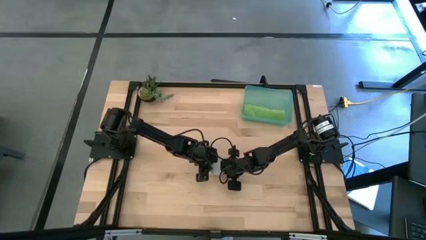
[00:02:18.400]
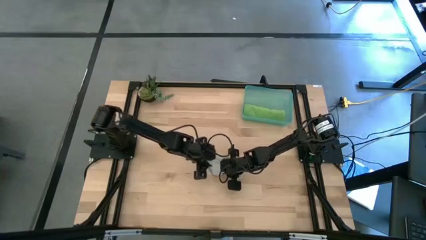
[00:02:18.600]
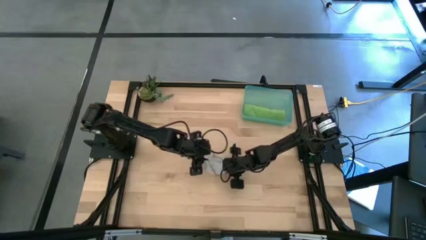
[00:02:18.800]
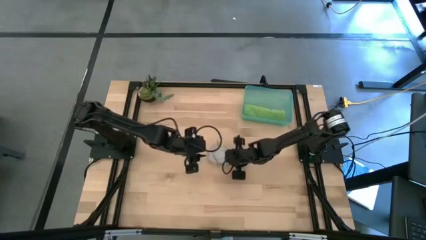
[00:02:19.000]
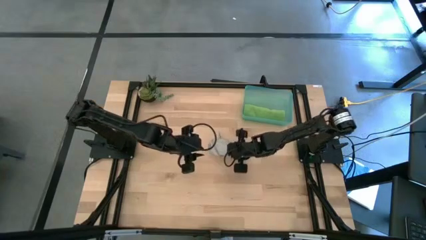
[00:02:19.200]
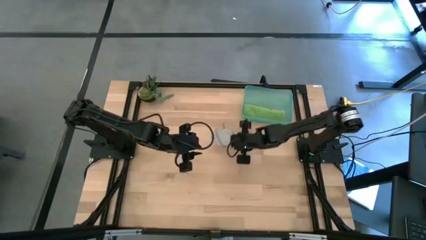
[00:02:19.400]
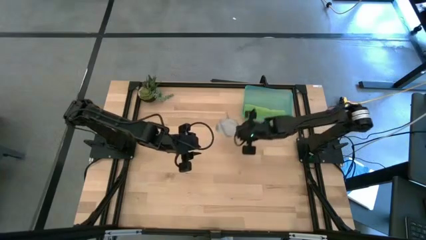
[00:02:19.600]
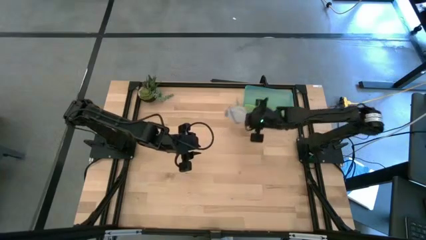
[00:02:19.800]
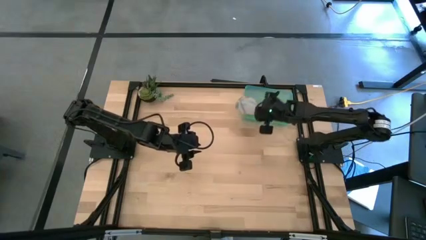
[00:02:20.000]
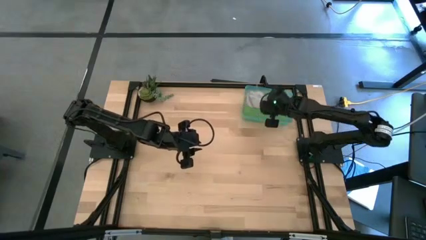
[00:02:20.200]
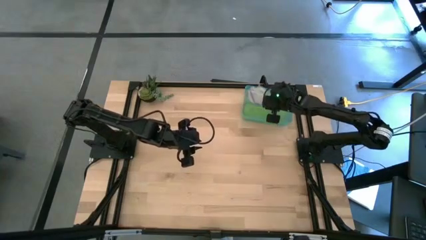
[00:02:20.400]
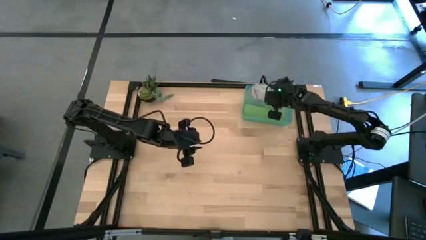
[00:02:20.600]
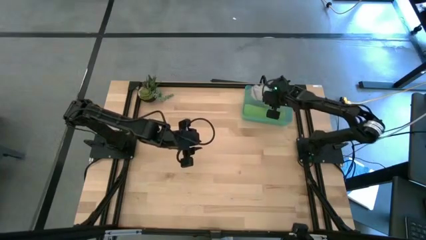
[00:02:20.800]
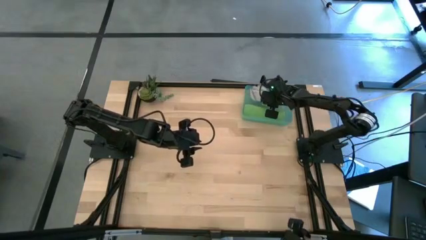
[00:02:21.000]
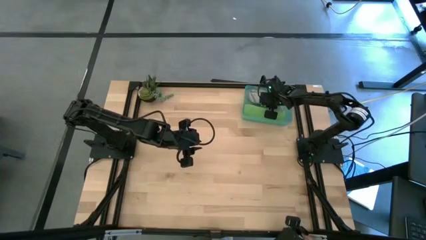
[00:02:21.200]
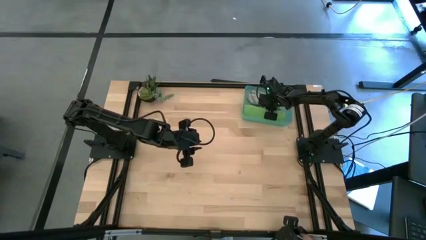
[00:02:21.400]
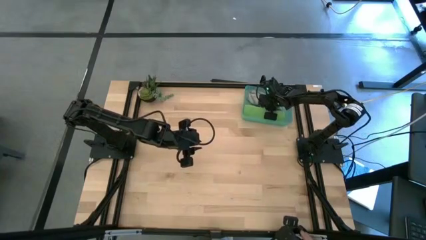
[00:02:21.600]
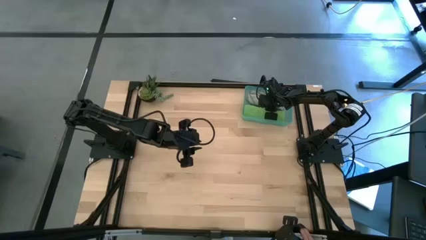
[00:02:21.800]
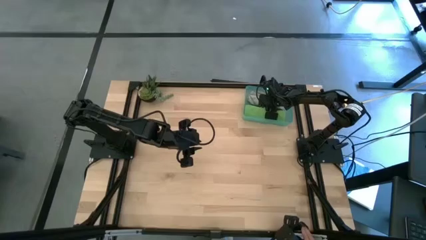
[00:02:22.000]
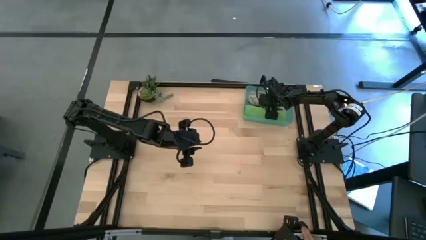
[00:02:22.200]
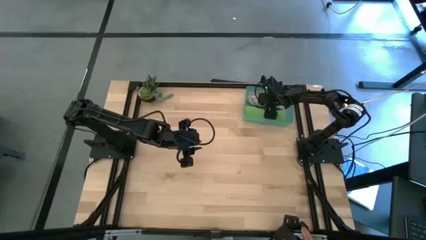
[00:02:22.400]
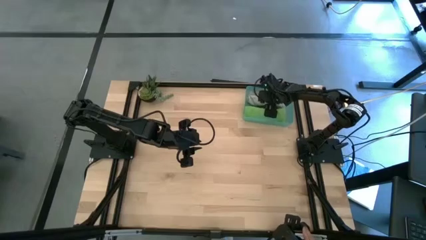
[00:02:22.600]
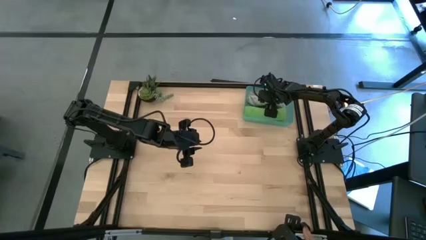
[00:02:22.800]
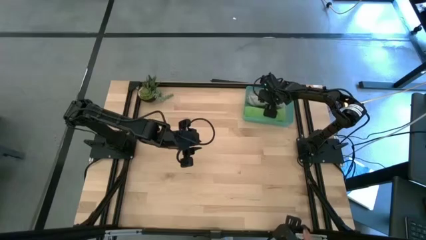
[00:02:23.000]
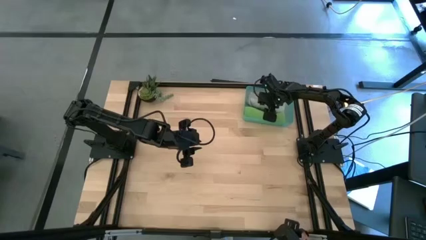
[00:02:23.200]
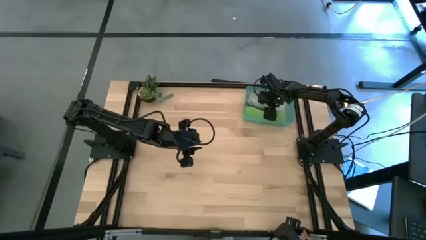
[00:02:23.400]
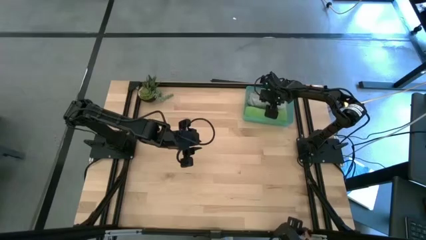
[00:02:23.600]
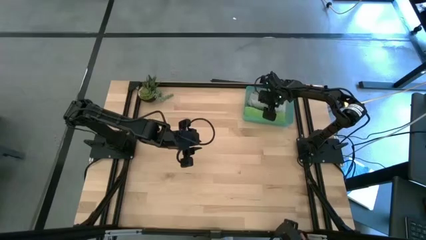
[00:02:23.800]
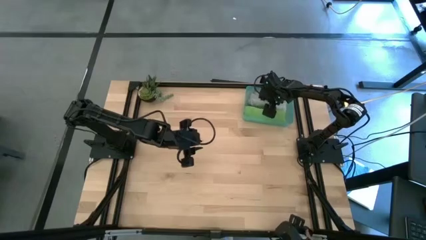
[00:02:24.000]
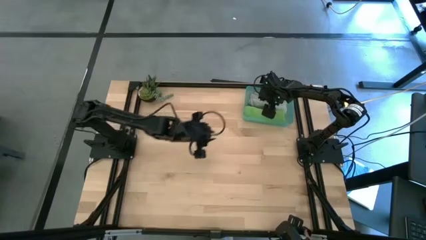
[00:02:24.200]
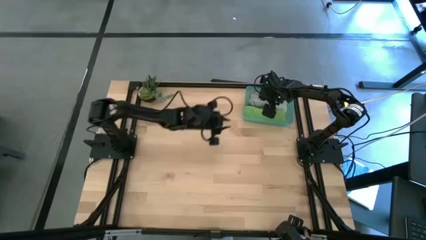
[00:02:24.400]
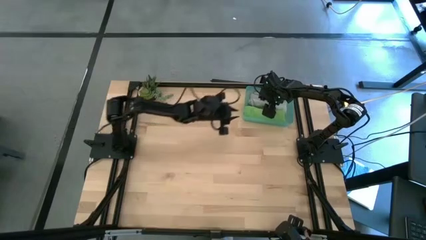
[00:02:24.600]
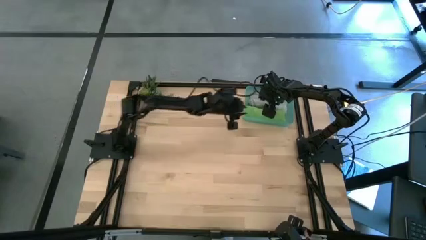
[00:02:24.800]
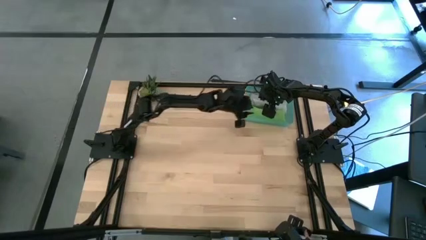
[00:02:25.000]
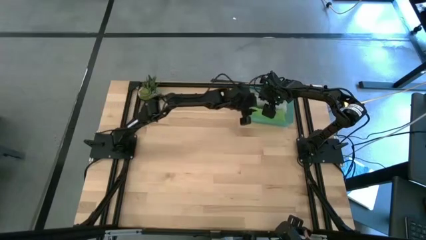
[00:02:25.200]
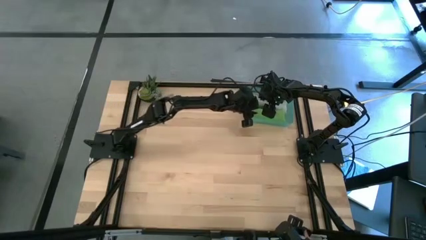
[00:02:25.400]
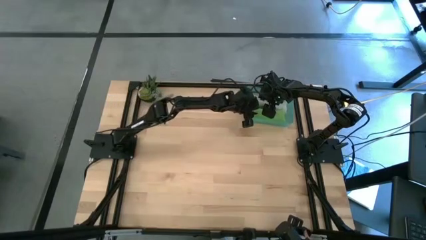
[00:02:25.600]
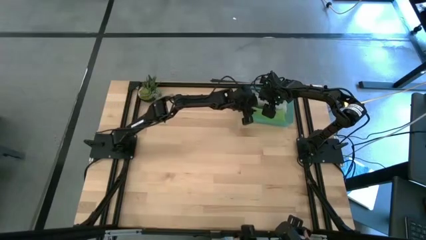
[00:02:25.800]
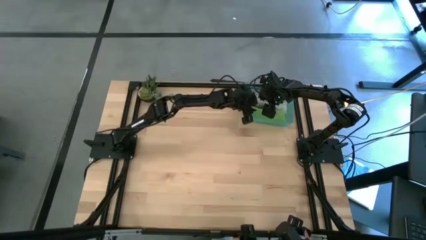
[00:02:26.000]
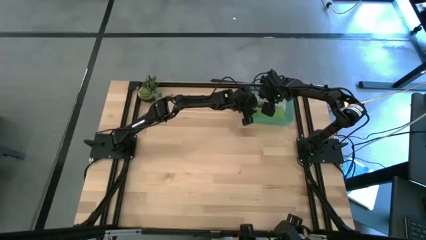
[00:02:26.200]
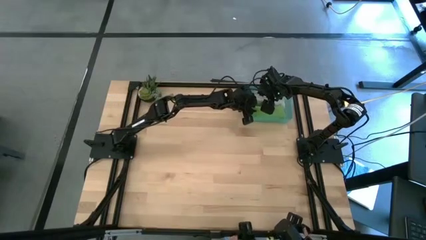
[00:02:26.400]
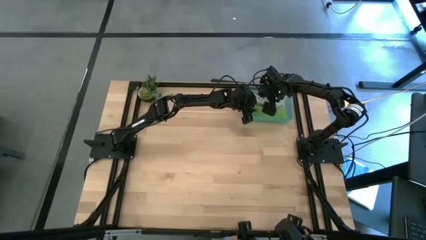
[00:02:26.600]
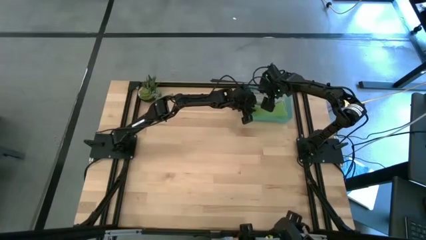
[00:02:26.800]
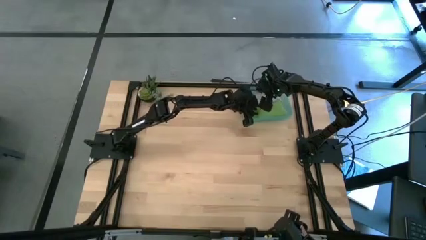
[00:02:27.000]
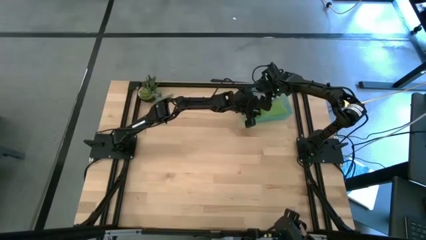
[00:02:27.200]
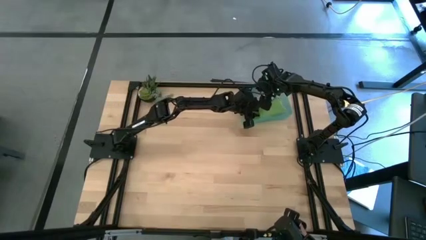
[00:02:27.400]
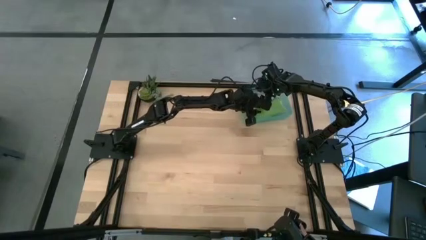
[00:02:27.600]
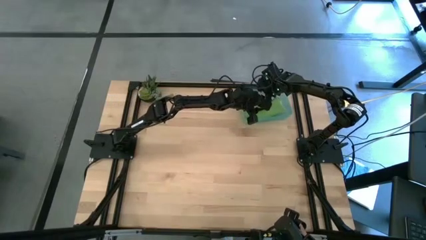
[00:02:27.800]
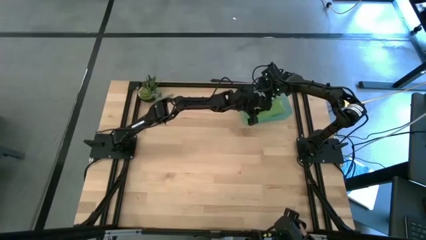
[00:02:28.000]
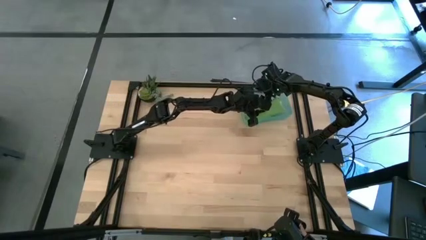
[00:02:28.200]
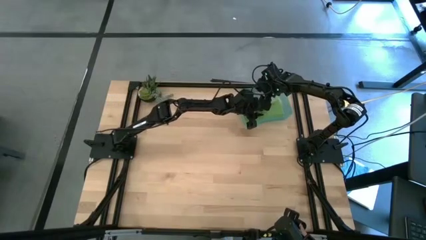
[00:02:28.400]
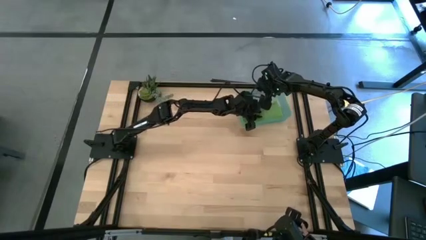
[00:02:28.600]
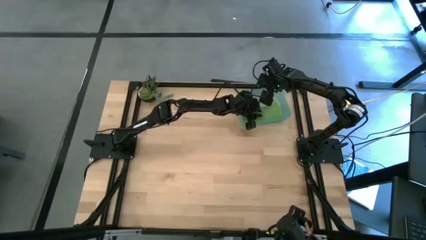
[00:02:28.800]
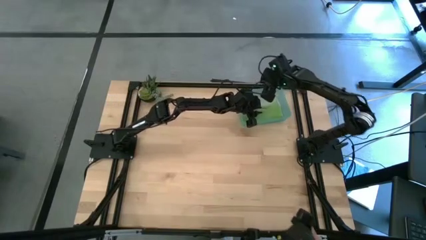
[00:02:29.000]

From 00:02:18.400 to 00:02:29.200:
Task: Roll microfiber towels into tight, uniform cylinder then place into a basket
Put the gray kitchen towel into the green bin

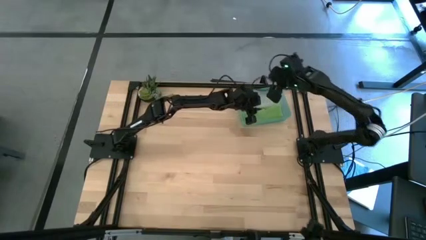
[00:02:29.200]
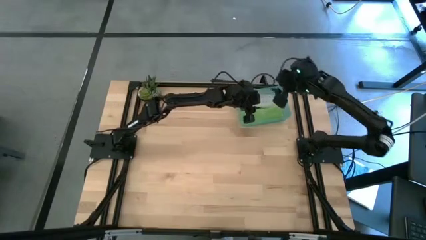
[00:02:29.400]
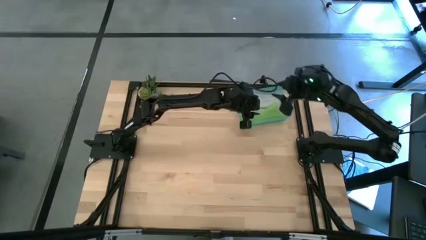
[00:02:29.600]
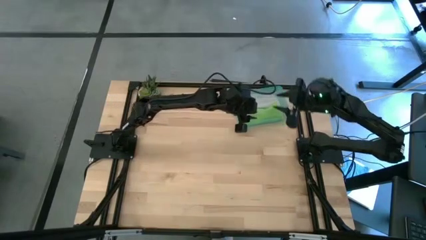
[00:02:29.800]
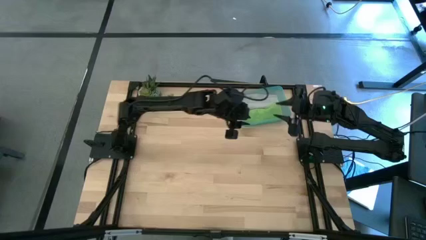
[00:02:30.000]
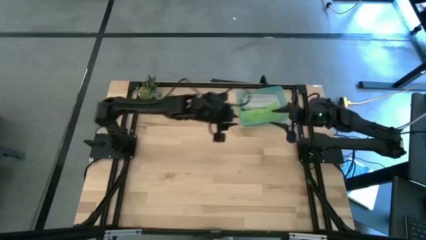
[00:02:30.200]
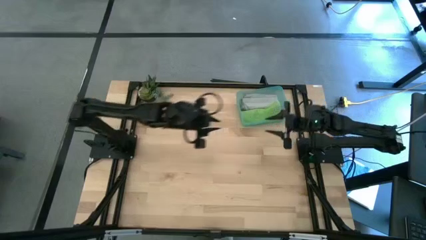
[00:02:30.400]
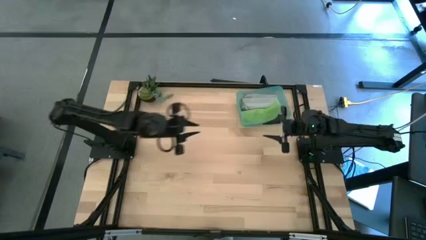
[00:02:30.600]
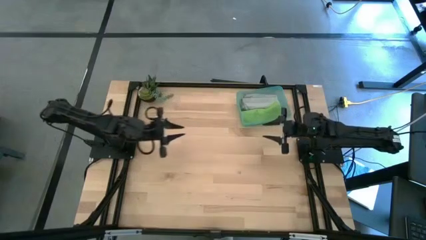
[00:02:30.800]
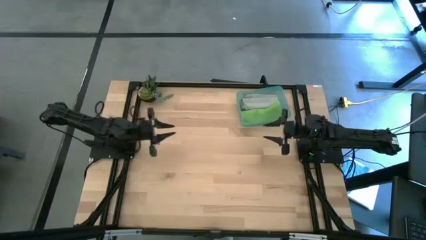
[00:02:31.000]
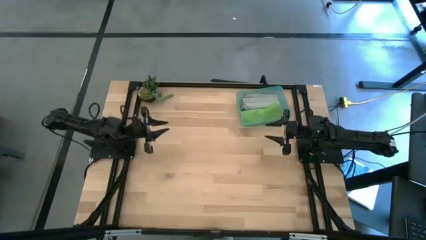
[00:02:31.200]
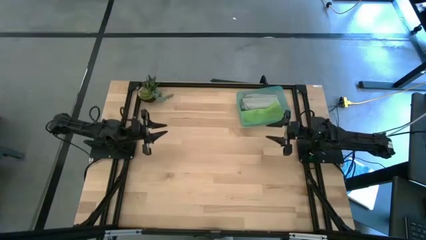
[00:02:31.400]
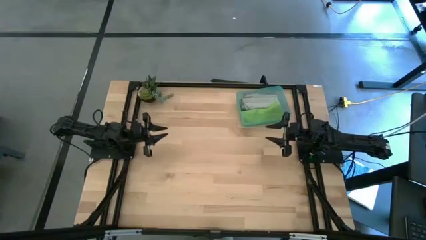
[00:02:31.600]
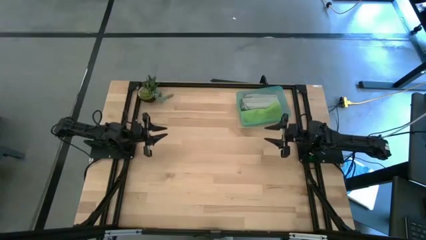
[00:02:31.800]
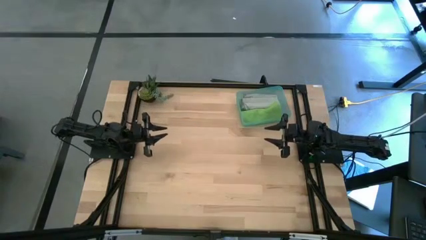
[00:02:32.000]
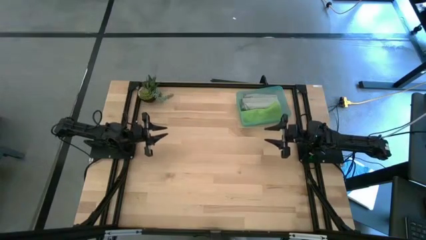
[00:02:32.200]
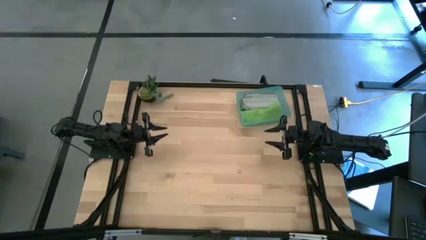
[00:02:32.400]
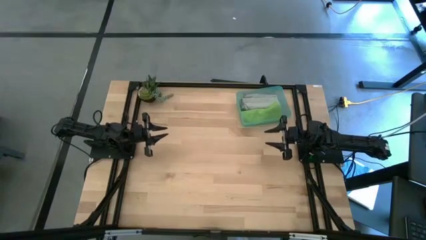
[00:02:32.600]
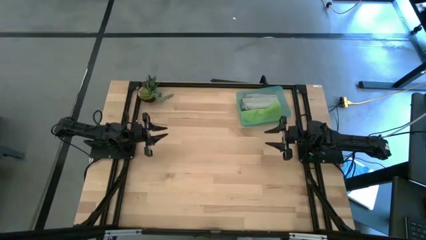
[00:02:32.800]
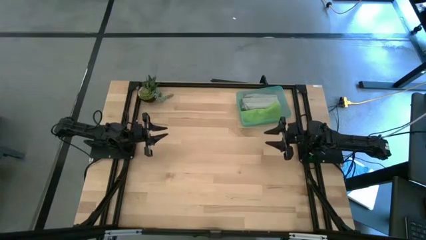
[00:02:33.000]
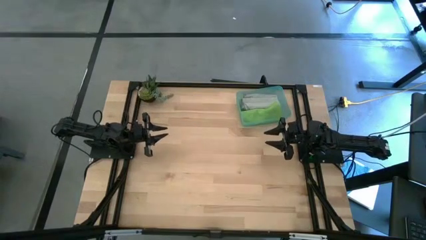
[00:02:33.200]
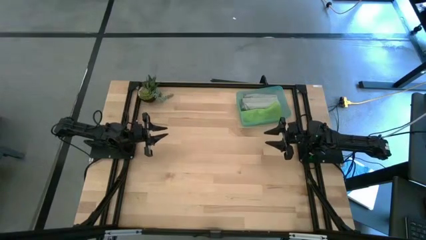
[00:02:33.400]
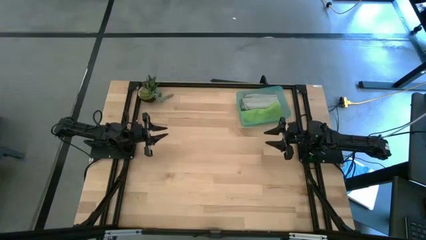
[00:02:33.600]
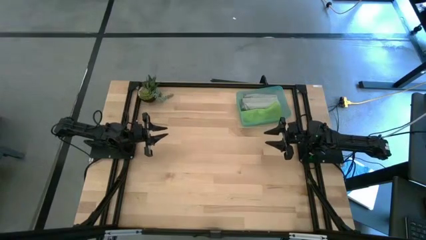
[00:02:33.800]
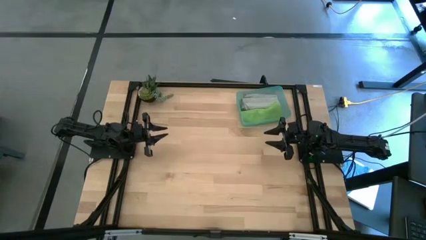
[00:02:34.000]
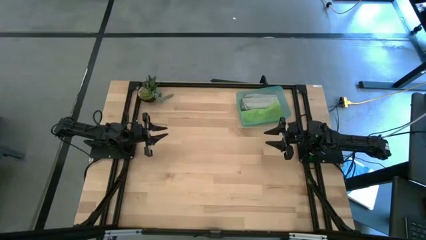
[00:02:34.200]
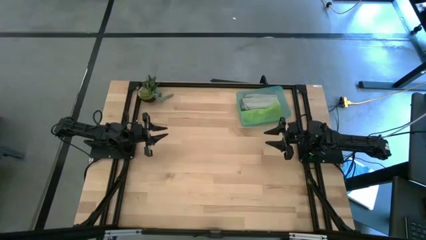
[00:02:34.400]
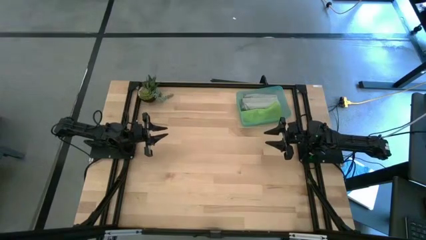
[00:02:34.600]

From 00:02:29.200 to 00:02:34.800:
Return to Home Position
